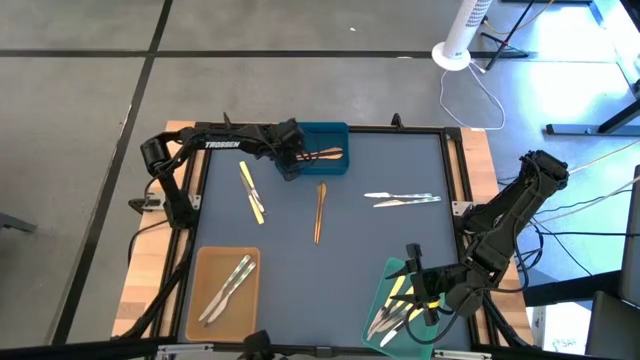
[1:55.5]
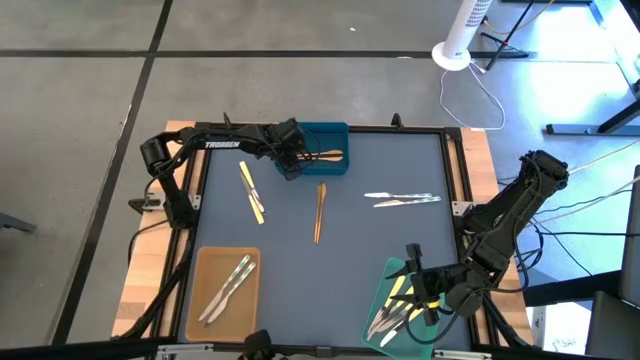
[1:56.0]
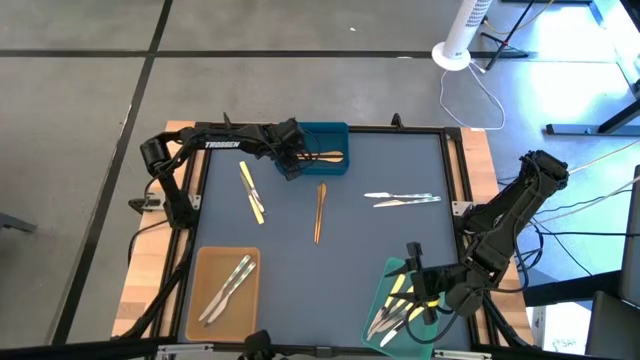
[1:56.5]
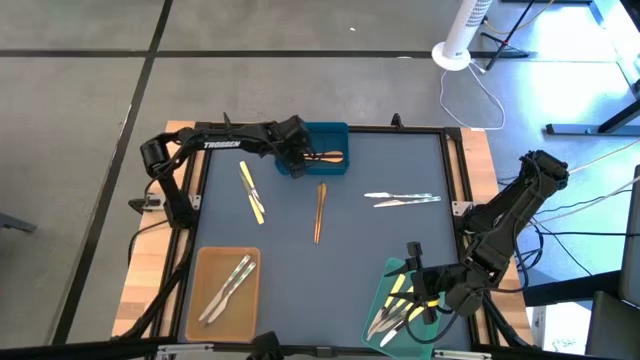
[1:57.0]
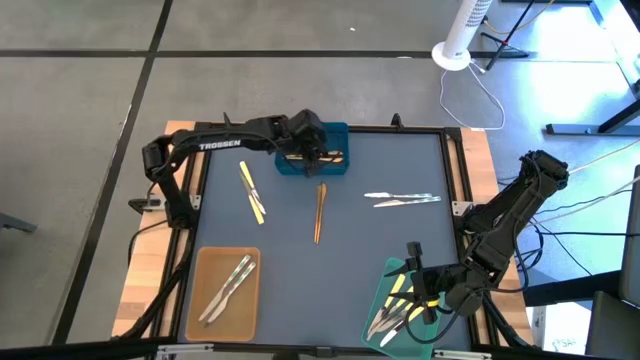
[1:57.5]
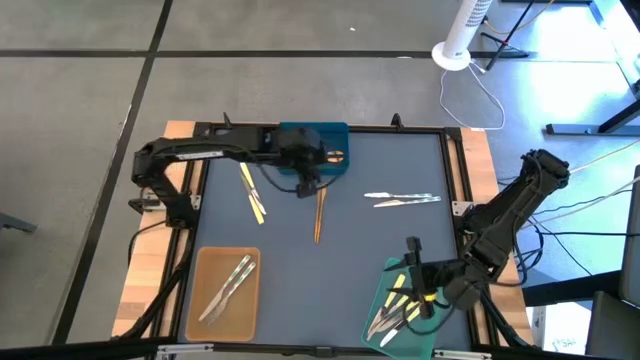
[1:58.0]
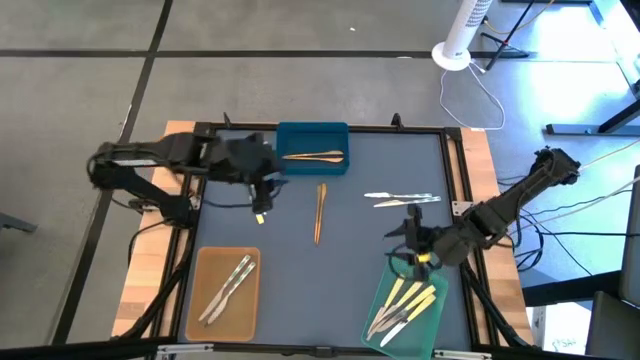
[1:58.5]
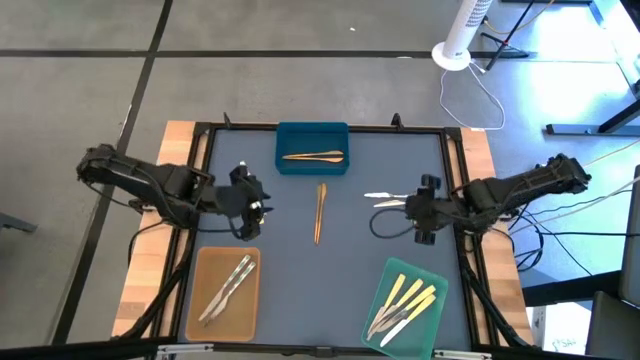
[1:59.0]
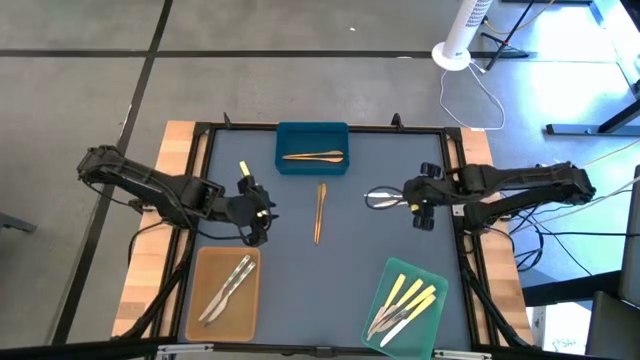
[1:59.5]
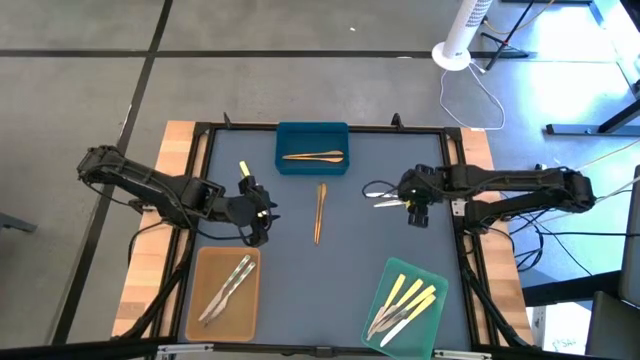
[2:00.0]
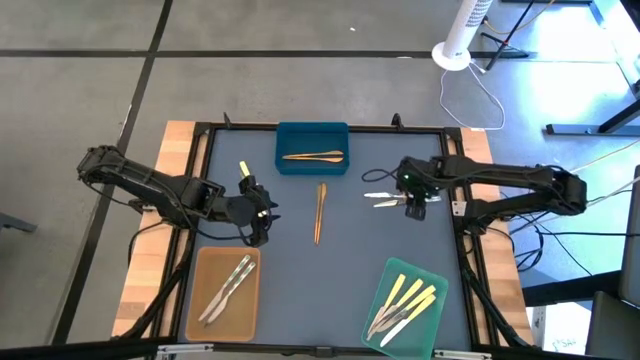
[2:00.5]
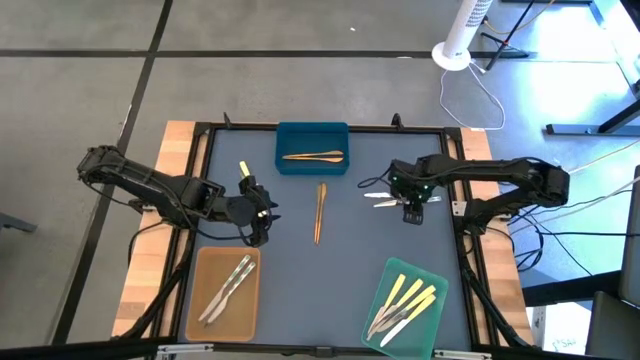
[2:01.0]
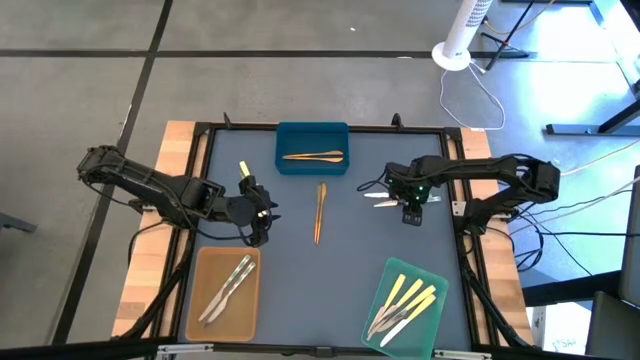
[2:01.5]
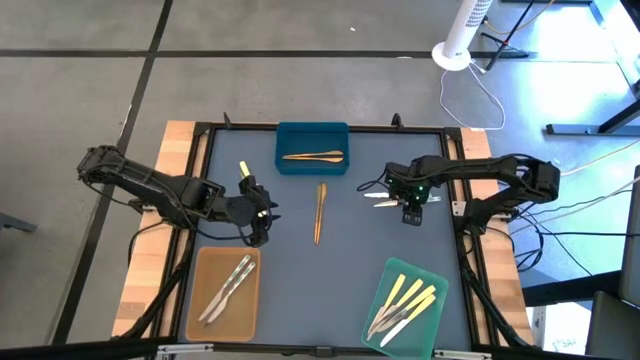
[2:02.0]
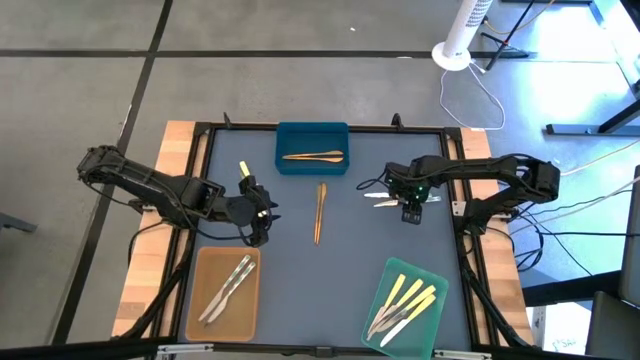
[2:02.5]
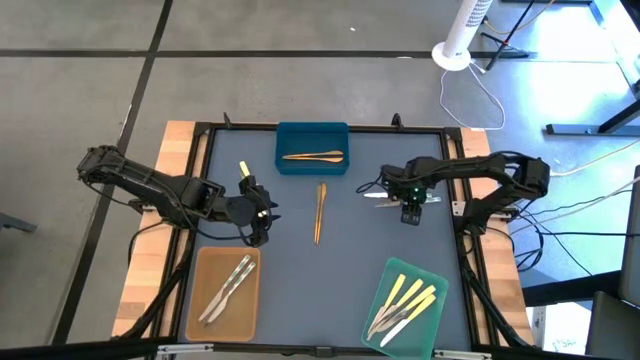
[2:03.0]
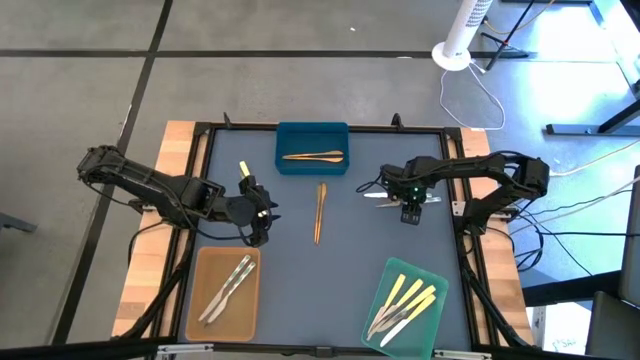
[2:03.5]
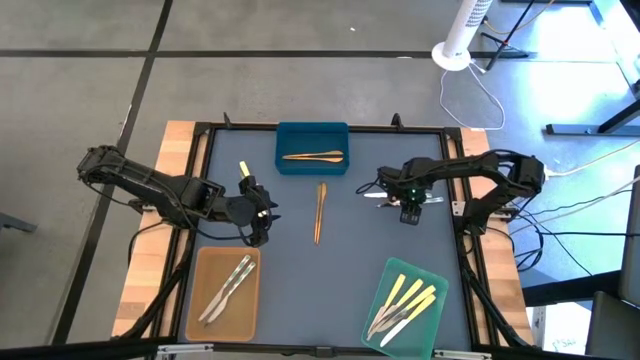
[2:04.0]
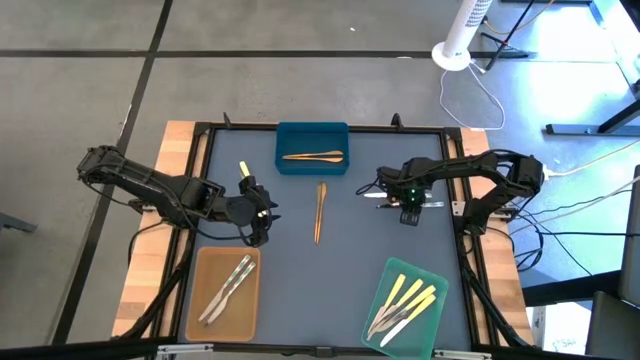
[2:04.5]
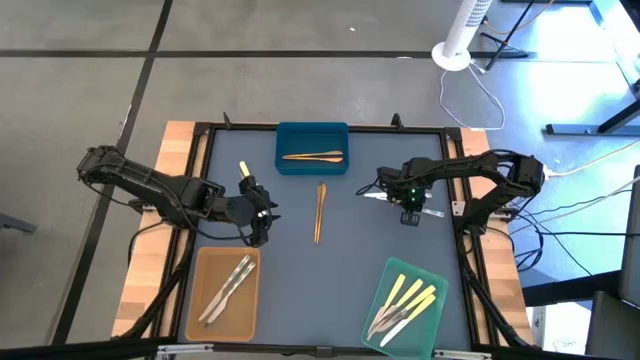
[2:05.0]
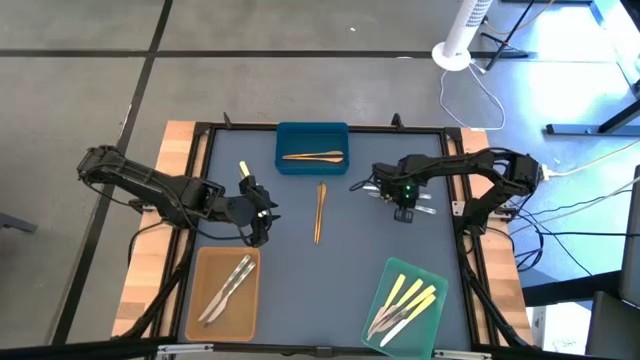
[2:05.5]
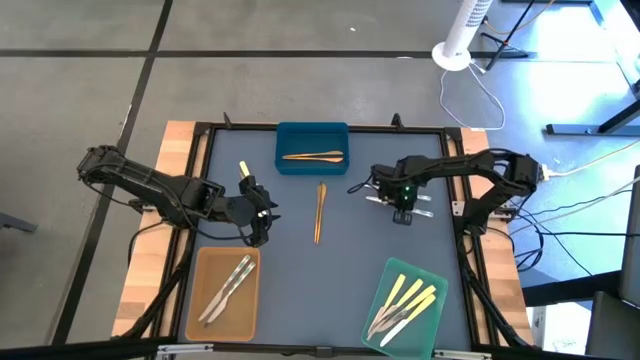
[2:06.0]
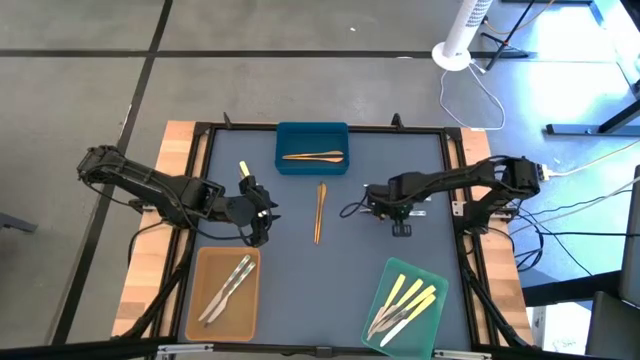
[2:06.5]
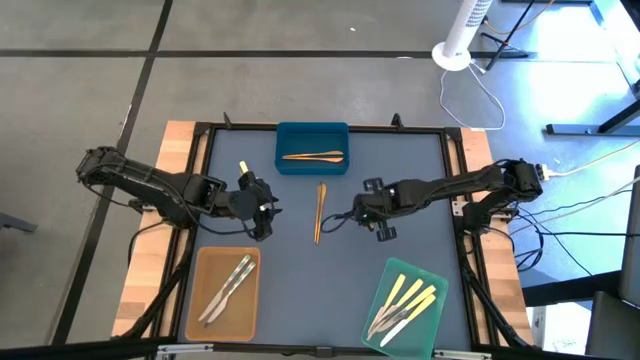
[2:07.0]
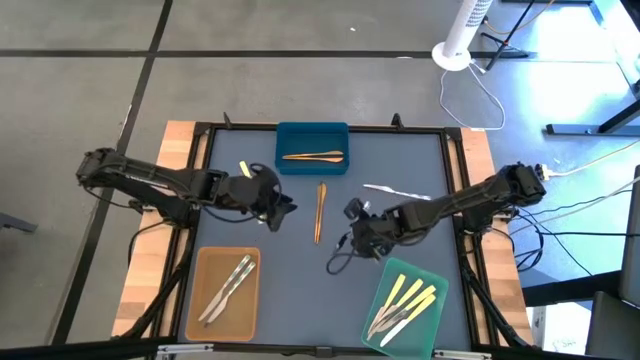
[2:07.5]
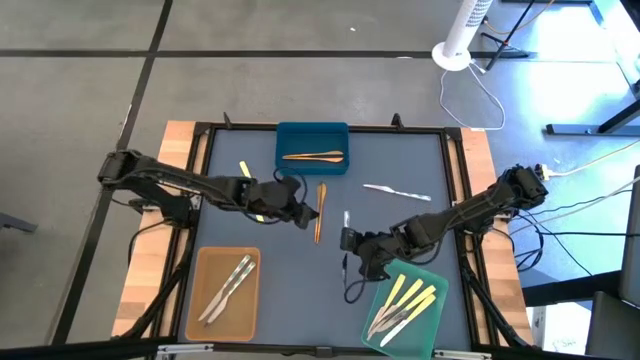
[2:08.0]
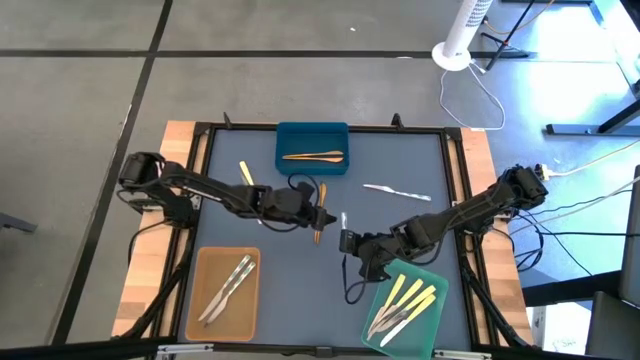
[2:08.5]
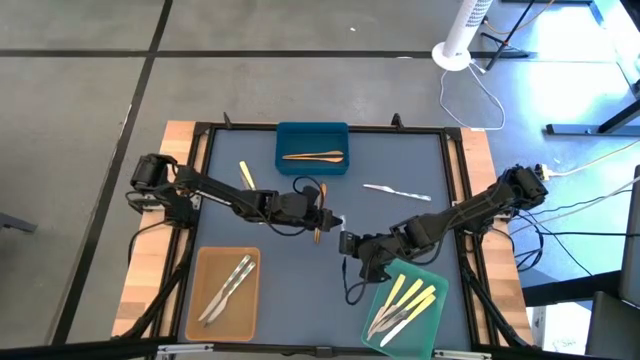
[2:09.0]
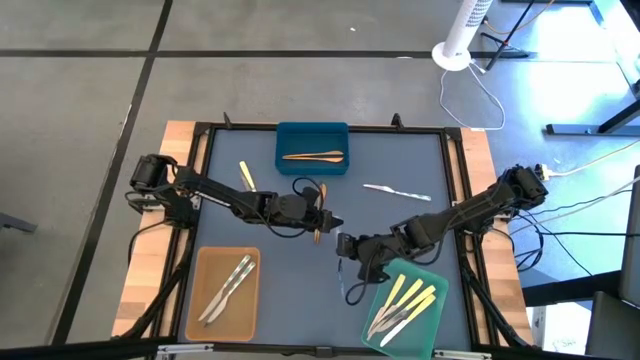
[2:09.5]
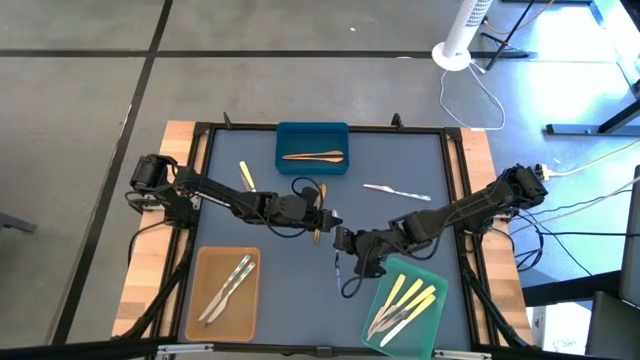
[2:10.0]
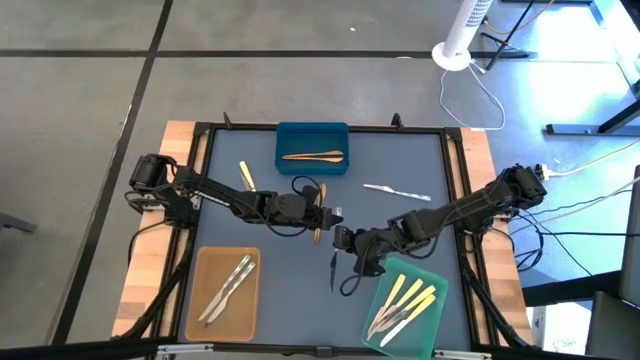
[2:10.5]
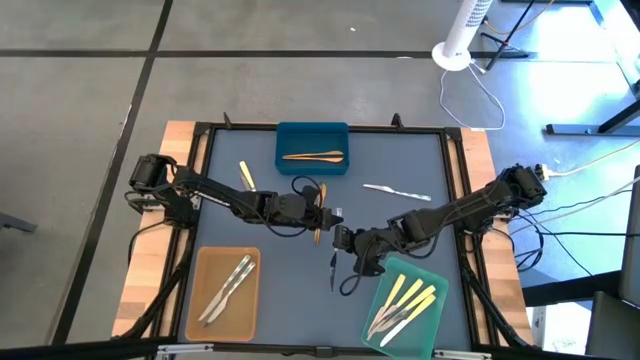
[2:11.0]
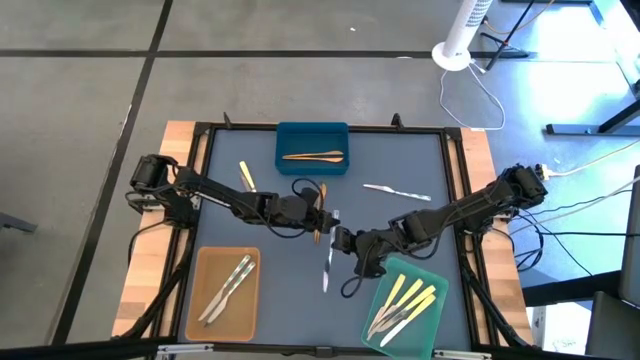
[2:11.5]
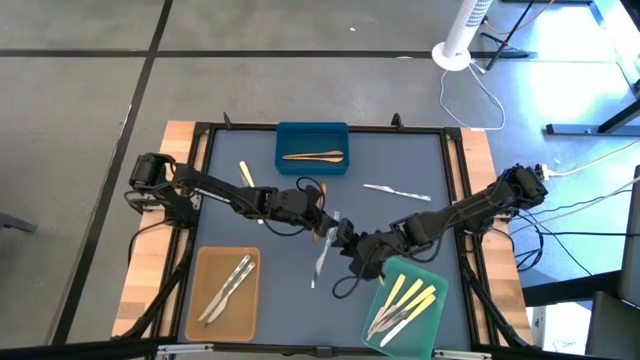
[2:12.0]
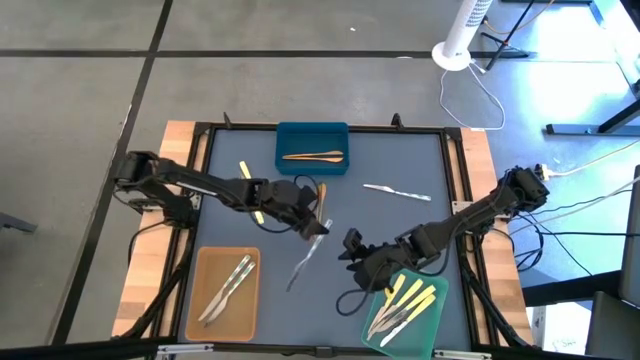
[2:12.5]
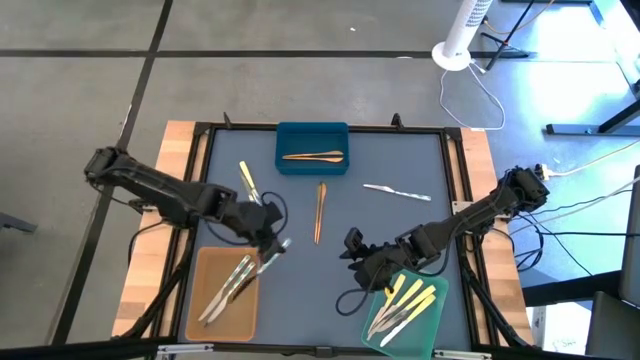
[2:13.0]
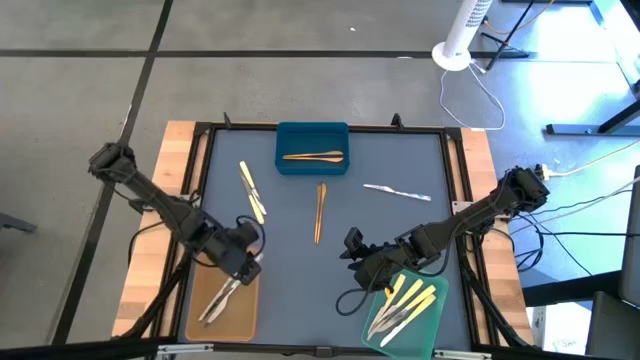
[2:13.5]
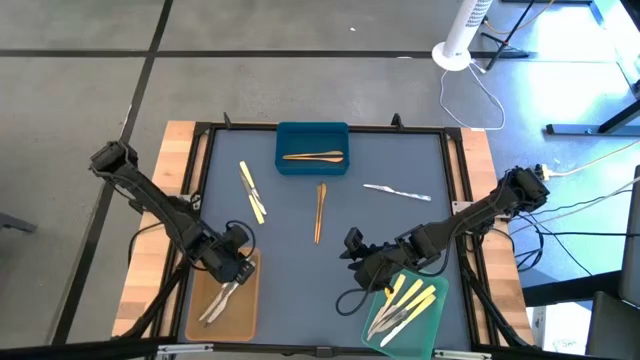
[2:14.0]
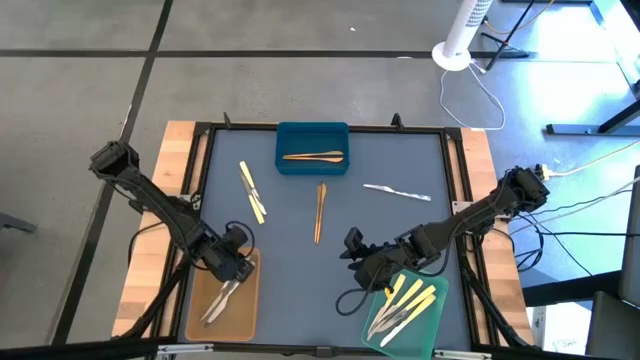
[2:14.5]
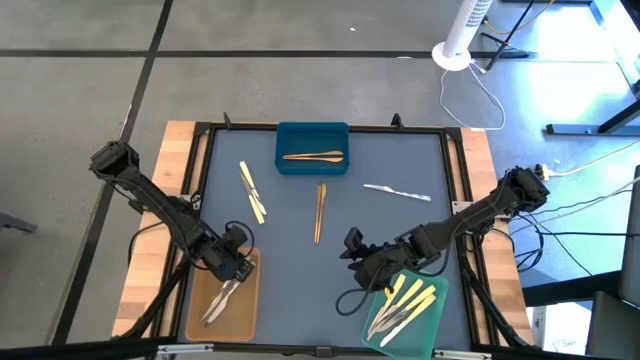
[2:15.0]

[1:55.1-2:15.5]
Task: Sort silverware by color (type)
Put the green patterned knife into the orange bin

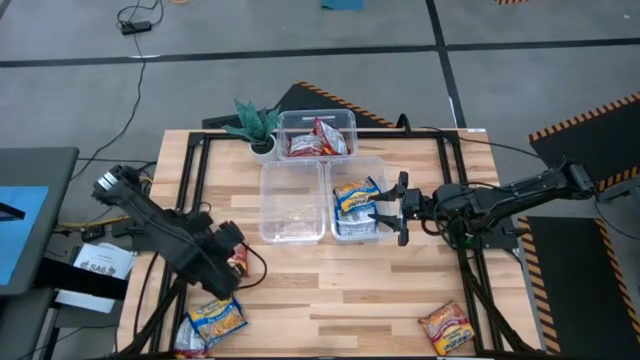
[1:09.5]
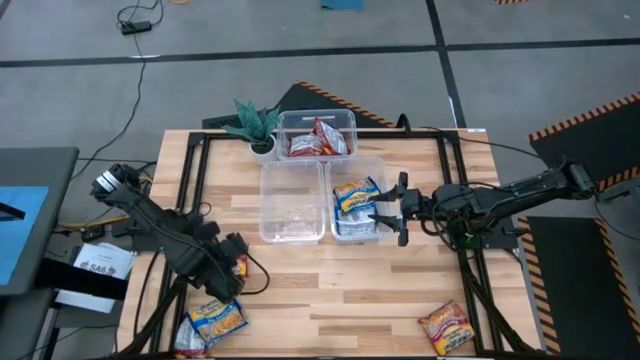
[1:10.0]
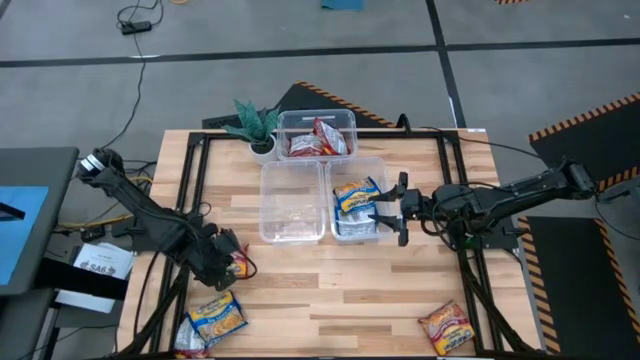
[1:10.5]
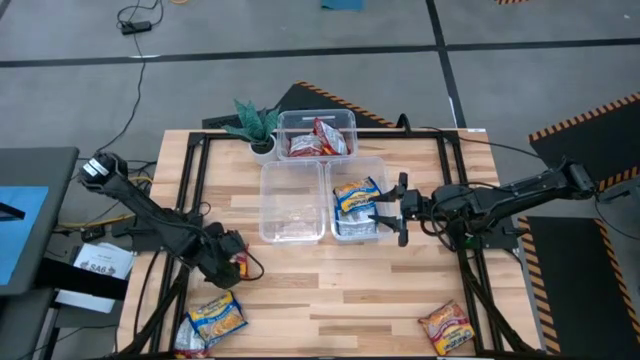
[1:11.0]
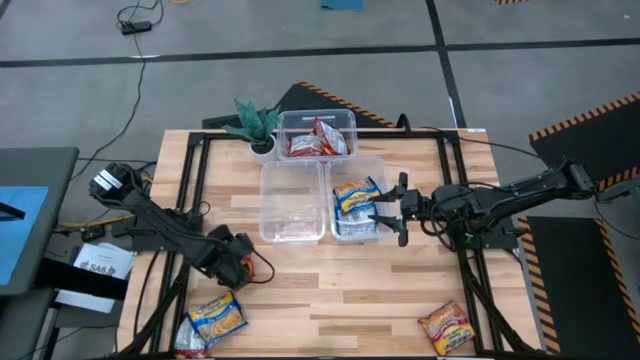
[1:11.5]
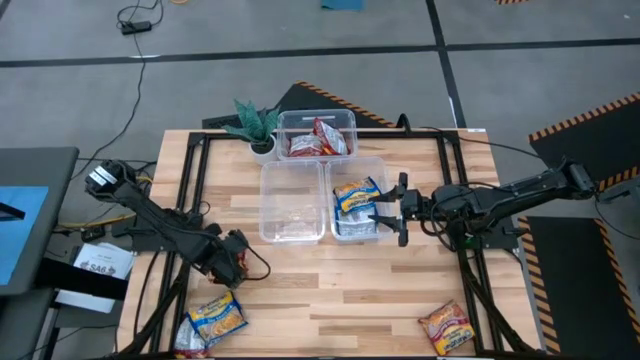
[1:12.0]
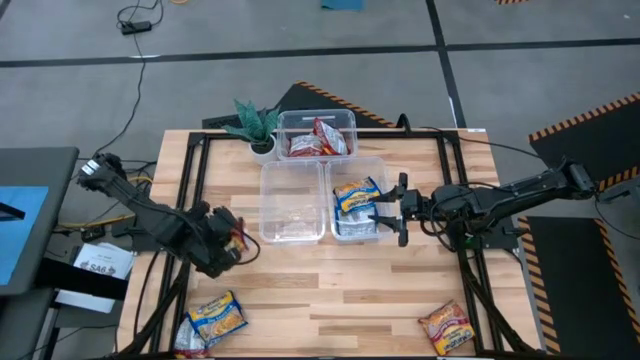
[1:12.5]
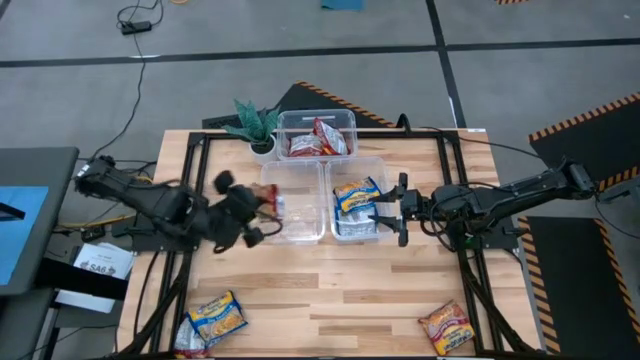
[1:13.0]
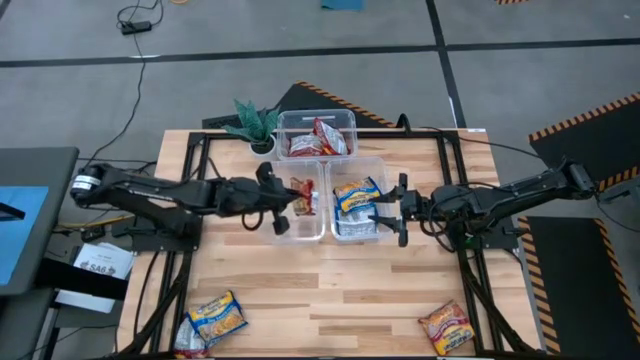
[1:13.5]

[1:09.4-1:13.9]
Task: Sort Maruchan noodles
Put the red noodle pack into the bottom left transparent bin
